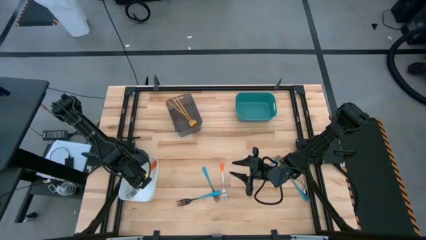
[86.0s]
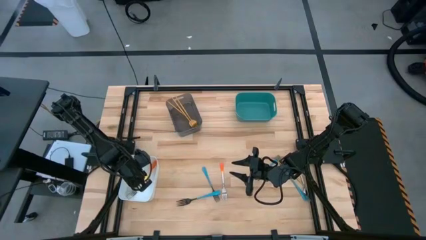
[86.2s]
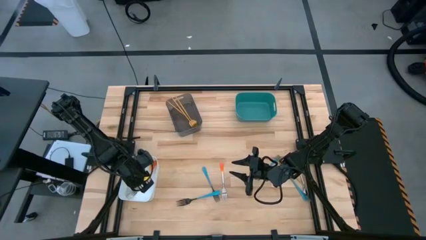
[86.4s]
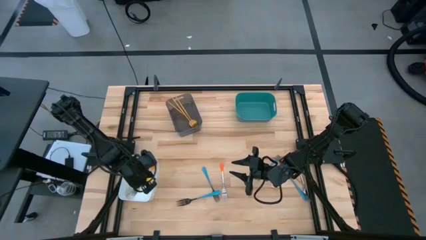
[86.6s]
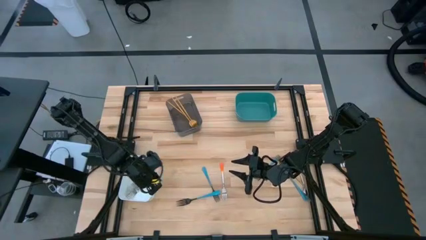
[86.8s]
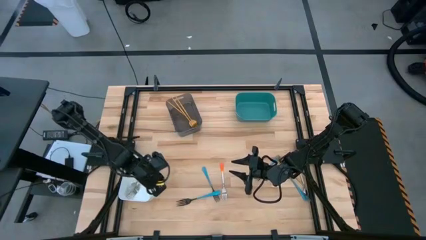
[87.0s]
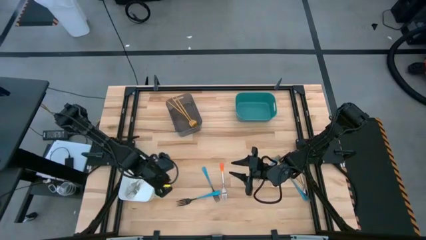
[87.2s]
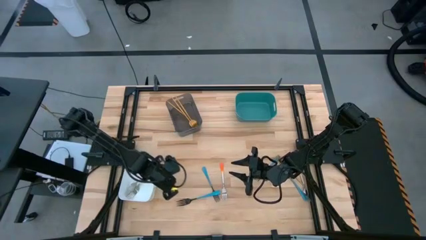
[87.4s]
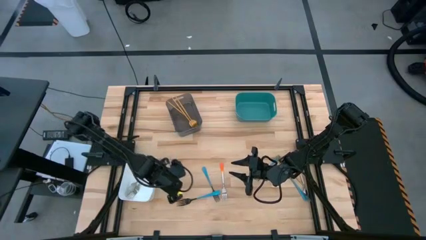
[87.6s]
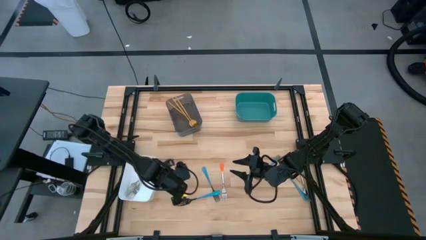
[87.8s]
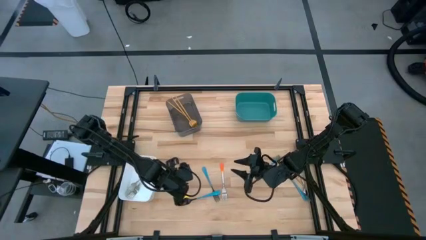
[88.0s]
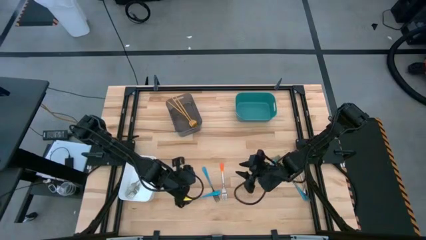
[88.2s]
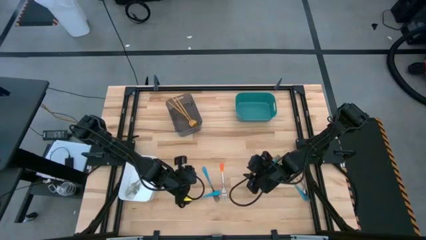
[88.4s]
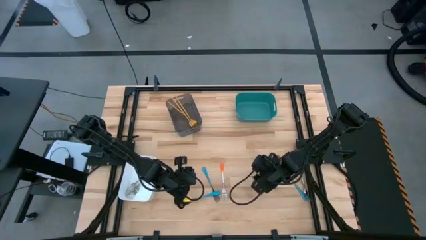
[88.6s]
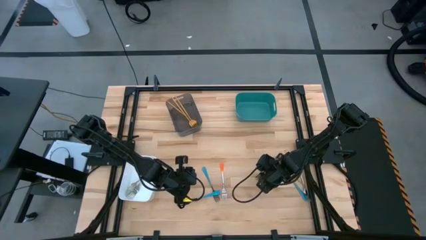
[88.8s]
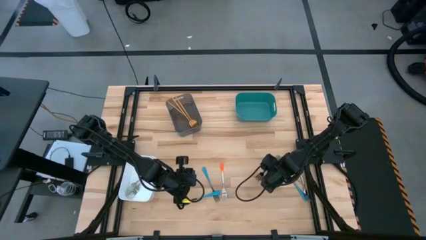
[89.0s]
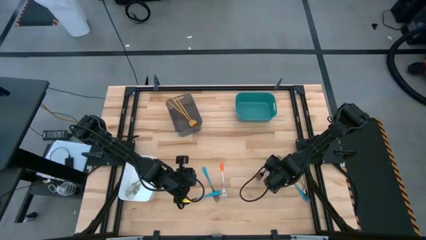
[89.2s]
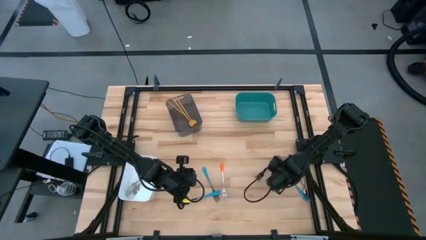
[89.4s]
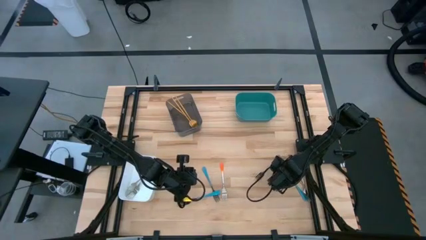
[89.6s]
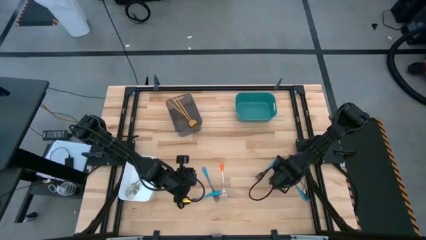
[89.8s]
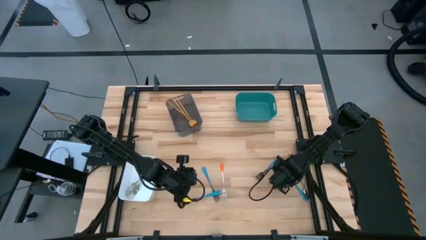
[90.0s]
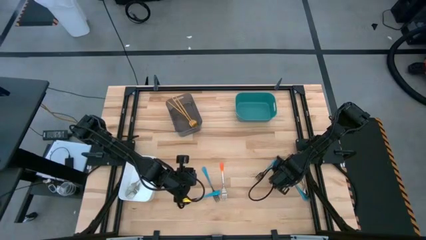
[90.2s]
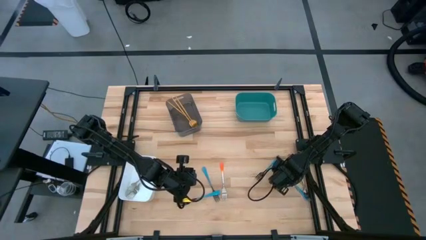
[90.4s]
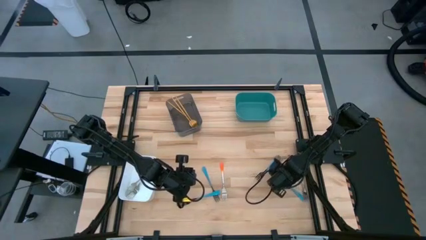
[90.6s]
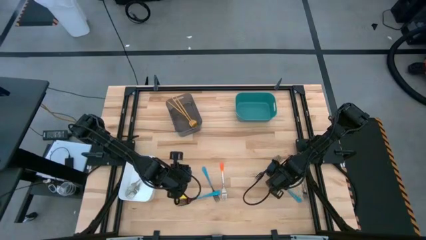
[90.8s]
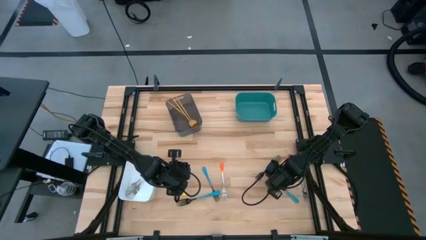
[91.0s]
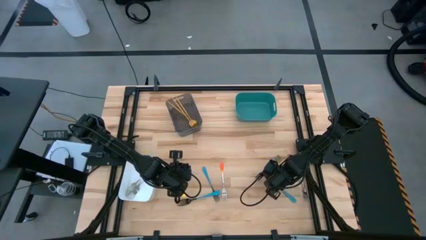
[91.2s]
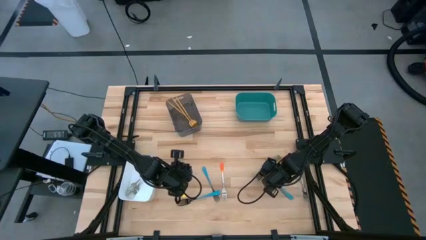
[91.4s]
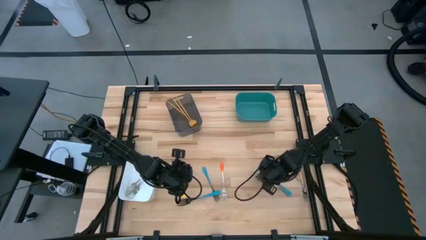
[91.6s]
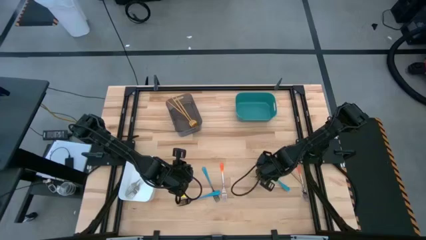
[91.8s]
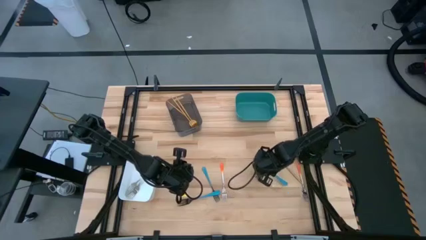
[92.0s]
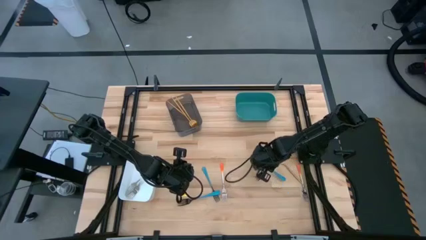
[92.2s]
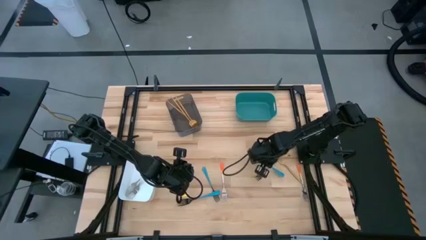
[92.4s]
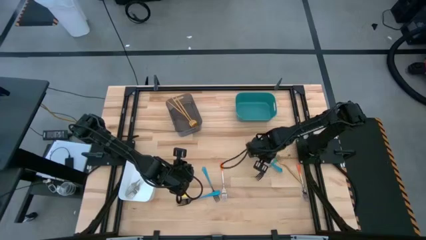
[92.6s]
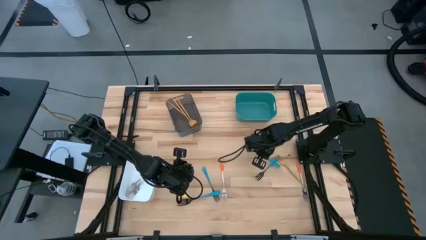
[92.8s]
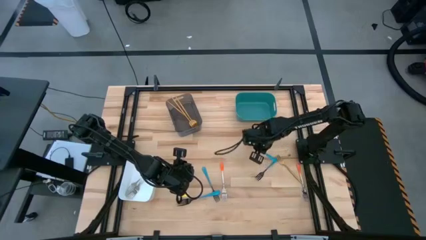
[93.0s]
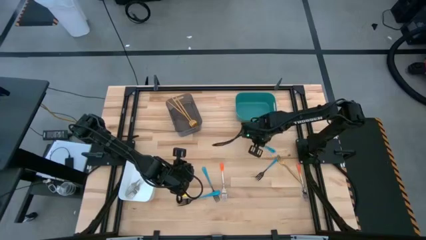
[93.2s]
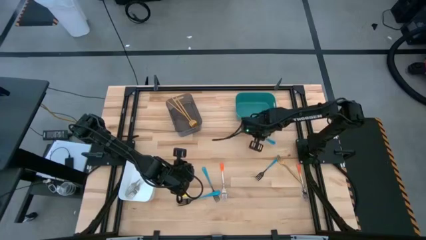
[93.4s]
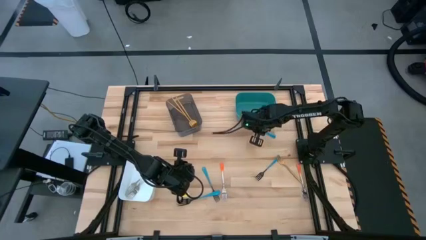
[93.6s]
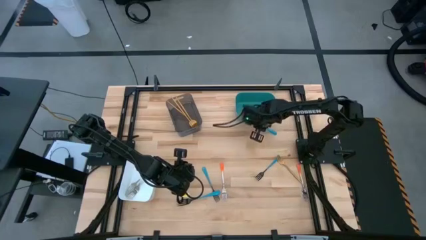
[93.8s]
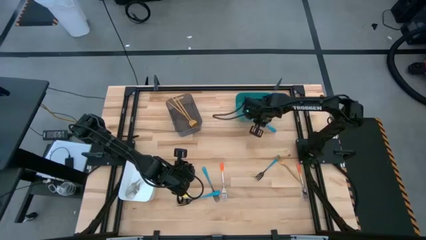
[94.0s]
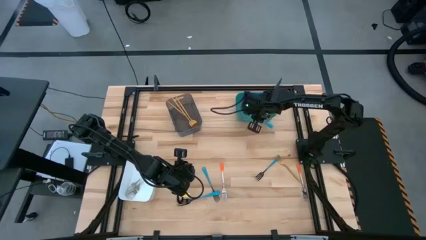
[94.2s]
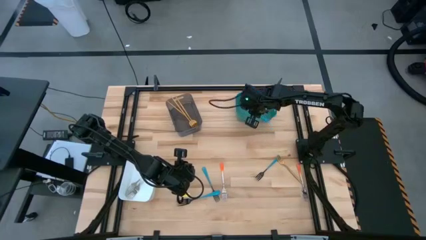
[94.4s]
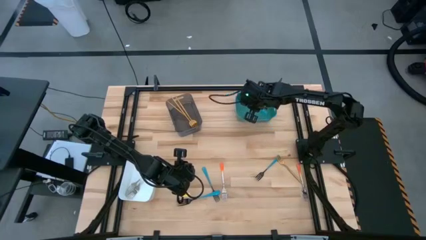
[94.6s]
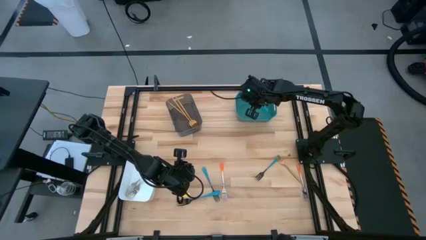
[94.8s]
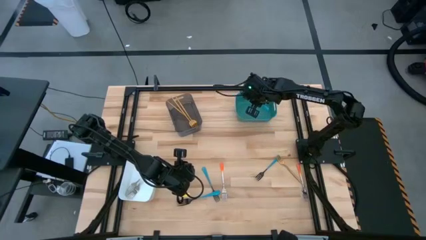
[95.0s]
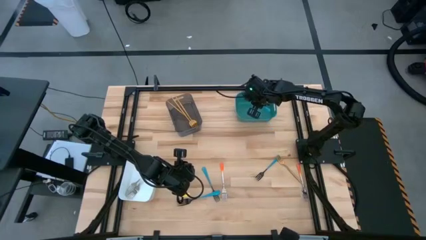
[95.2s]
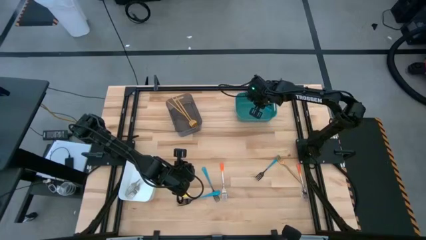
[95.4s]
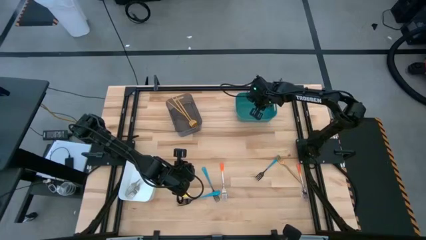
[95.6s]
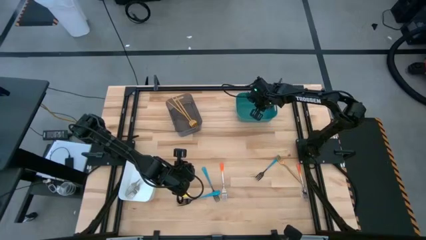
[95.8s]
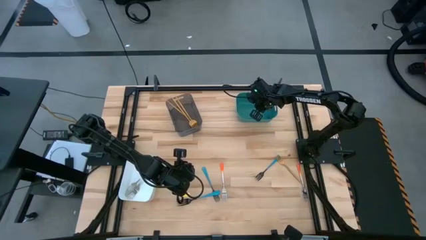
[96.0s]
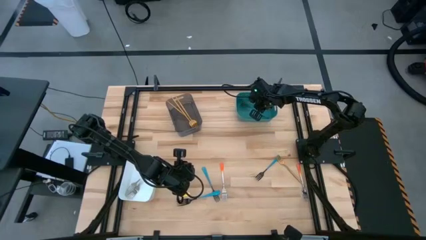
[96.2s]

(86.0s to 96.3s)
Task: Sort silverware by color (type)
Put the blue fork into the green bin

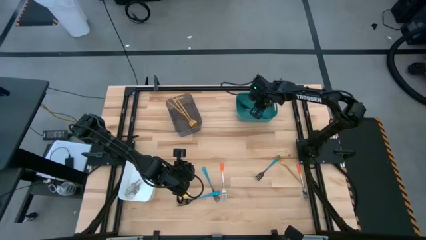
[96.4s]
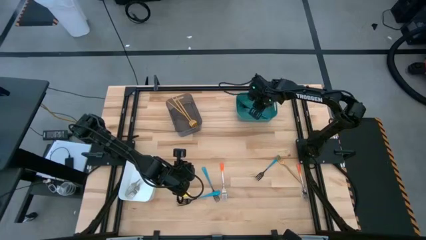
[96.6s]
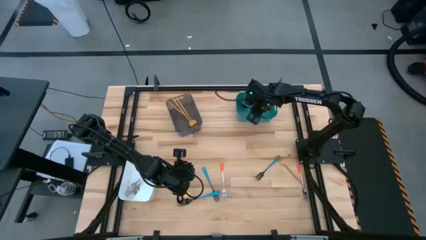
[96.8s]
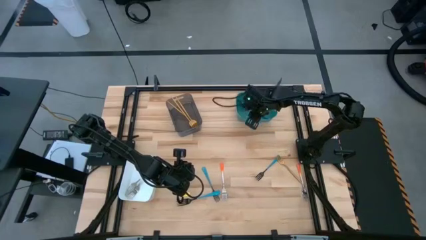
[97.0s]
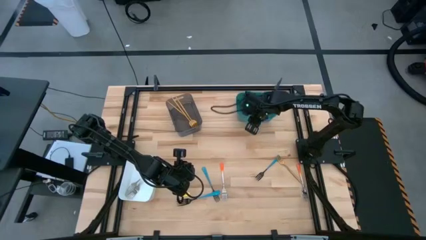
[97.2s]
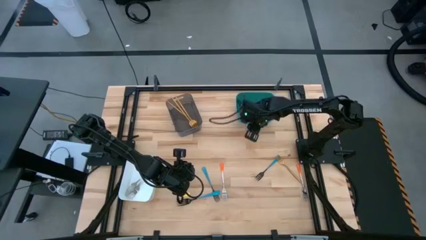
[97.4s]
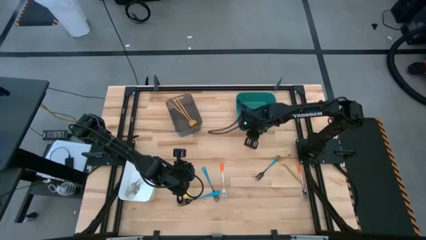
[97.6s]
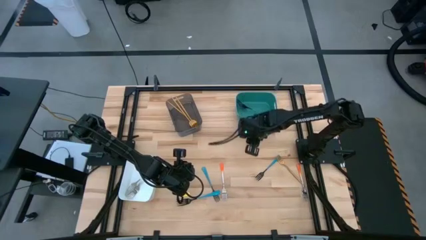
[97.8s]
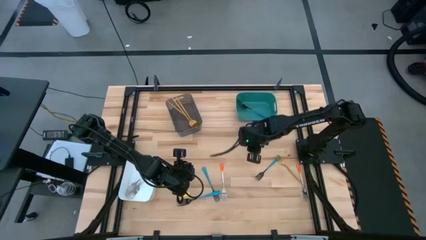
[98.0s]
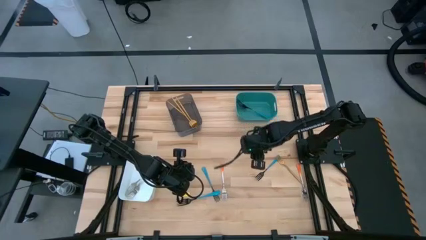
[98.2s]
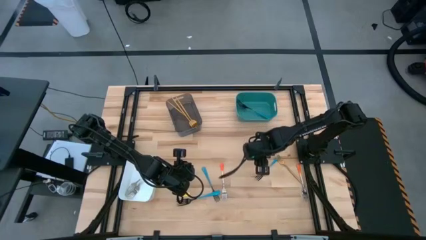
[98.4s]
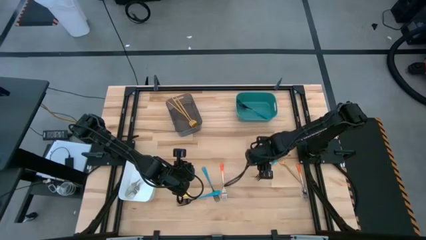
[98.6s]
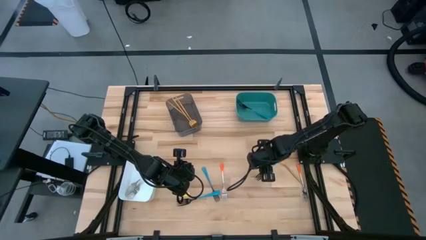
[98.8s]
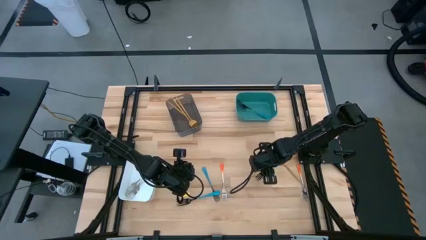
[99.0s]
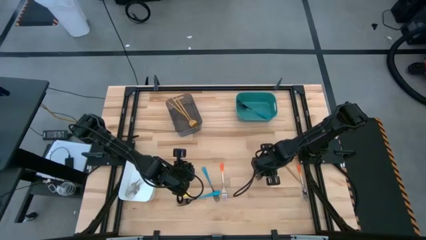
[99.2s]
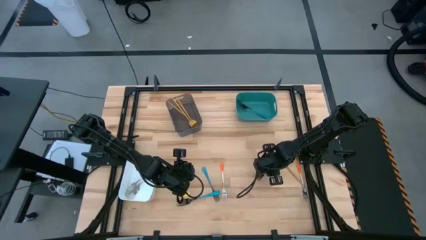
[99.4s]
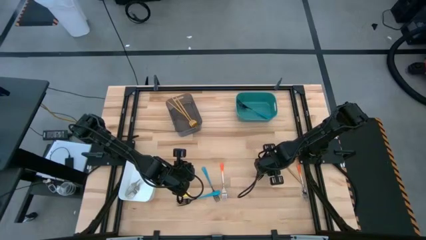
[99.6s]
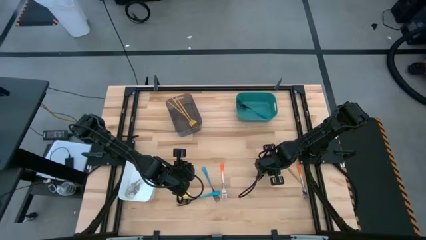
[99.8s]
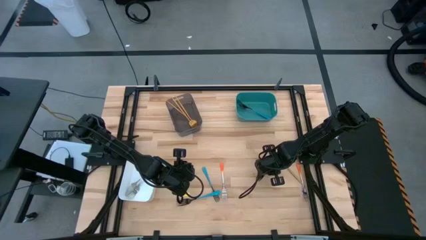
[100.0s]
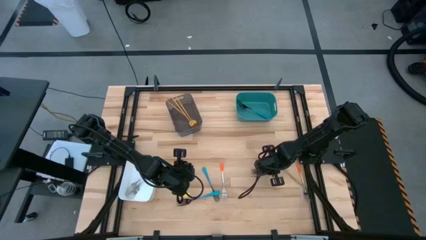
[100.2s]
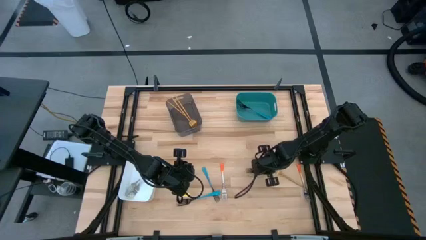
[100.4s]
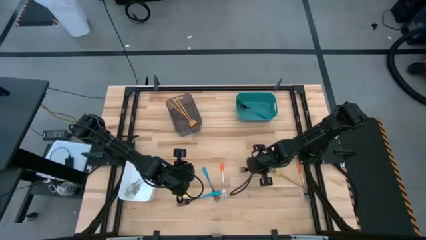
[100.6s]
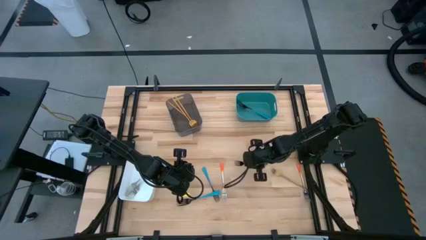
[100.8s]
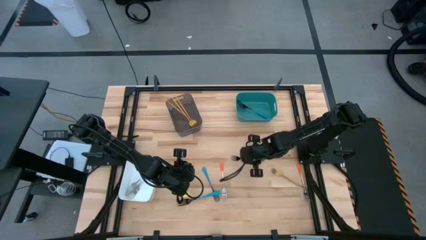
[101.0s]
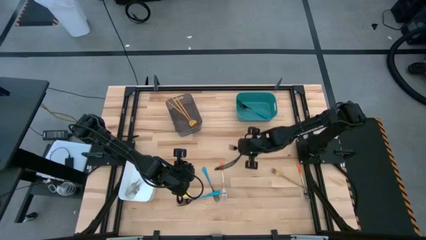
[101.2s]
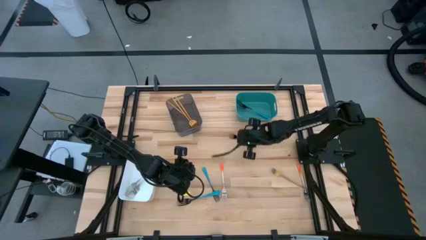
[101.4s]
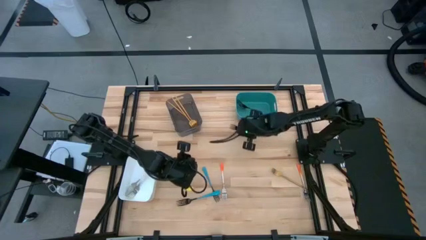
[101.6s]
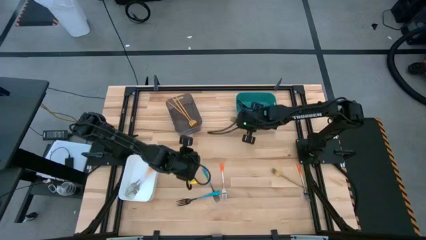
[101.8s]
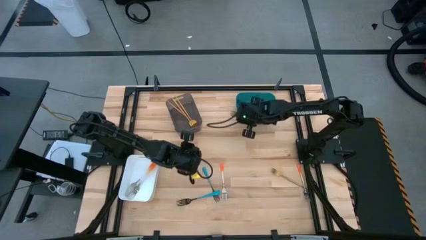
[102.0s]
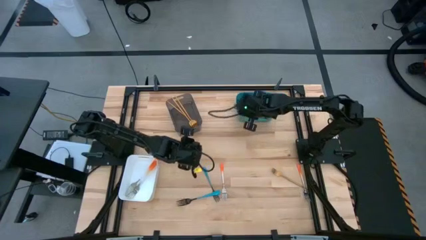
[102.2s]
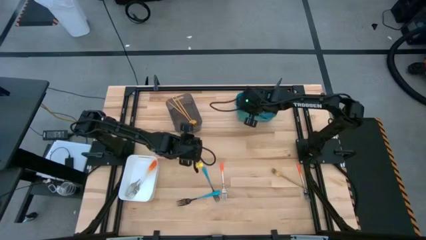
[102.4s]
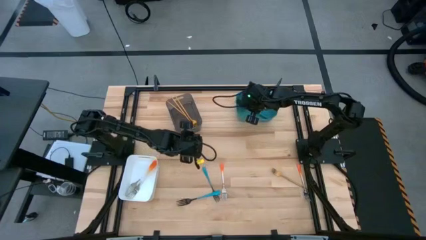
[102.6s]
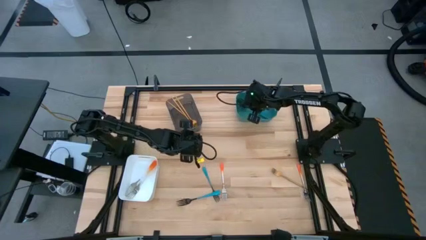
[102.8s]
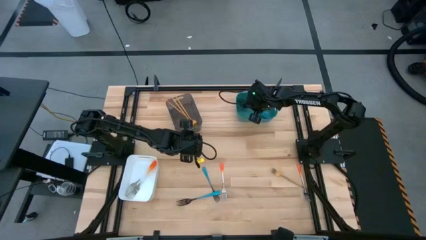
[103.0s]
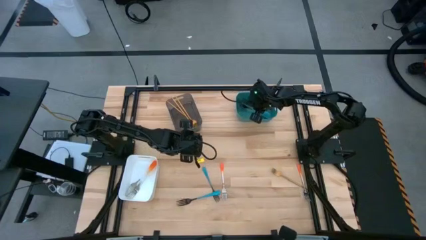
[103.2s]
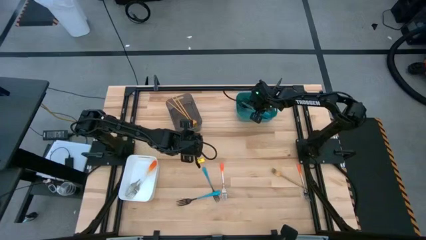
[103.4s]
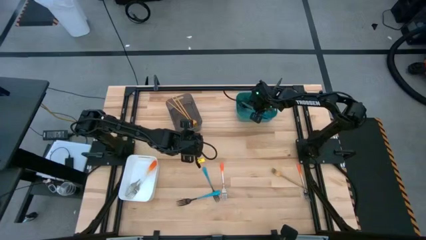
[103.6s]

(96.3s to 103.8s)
Put the blue fork into the green bin
